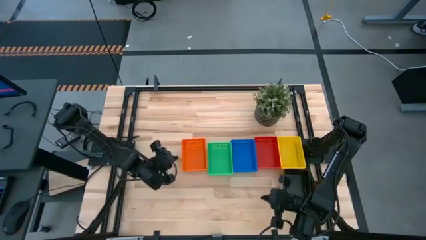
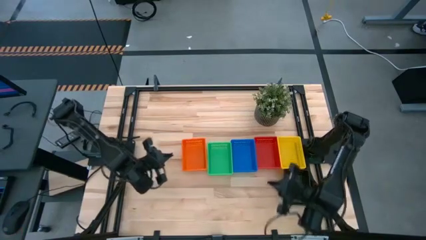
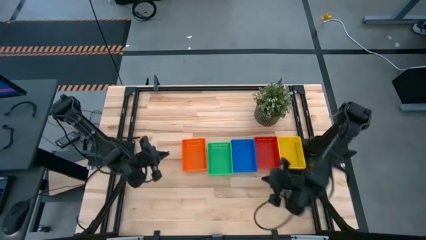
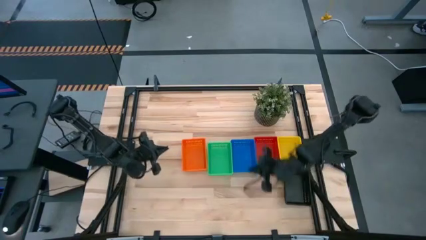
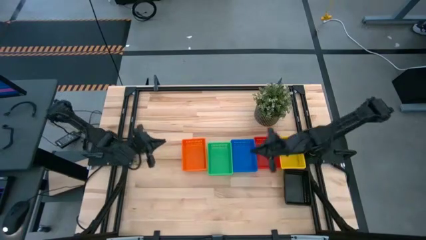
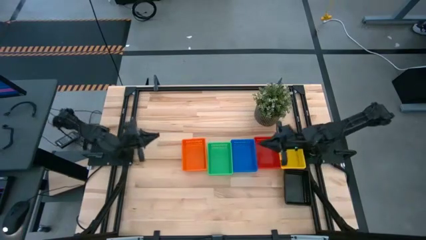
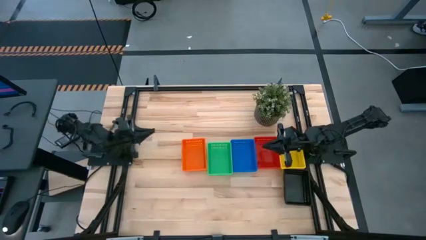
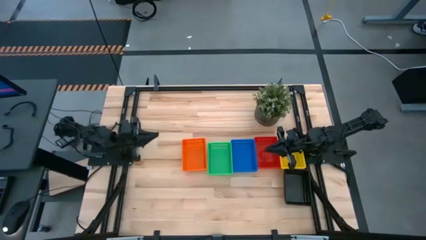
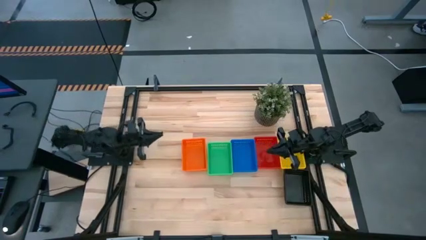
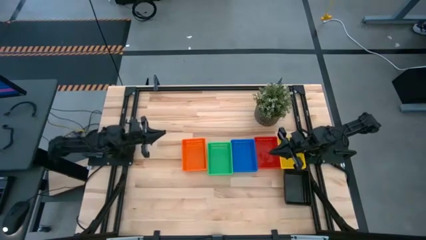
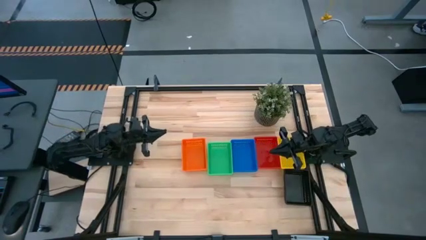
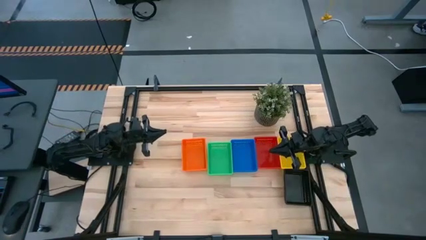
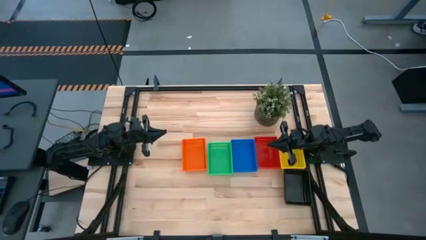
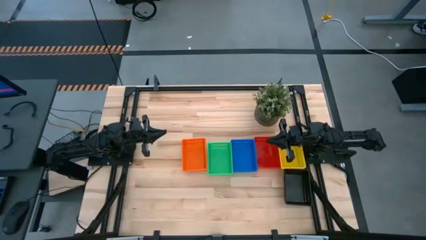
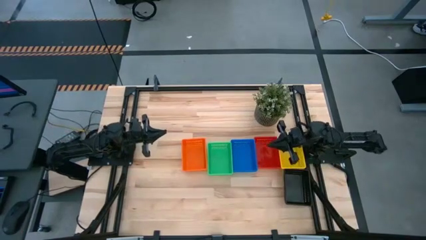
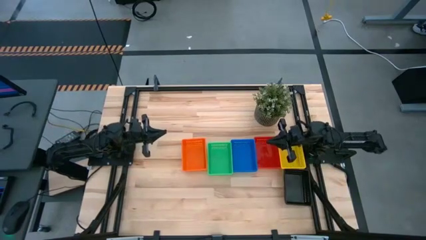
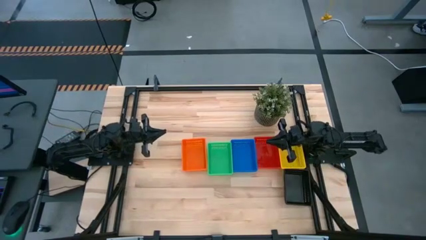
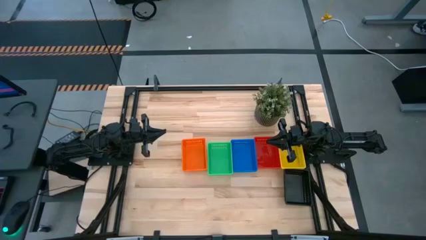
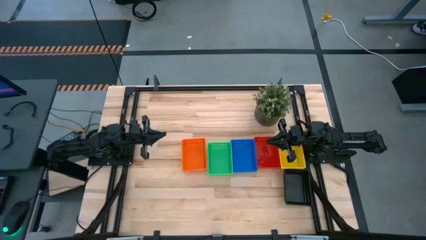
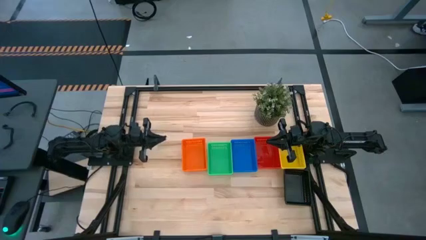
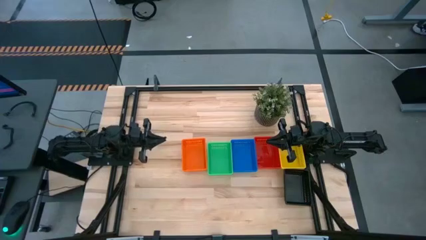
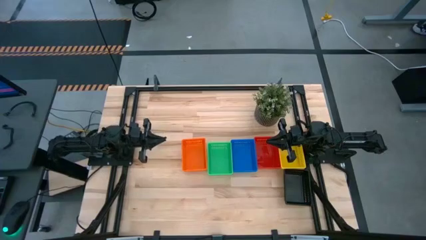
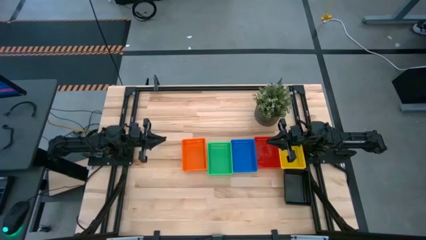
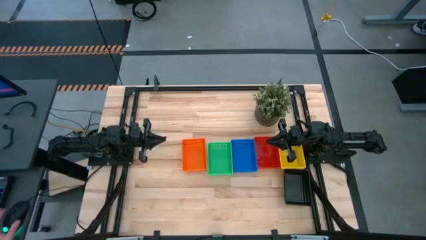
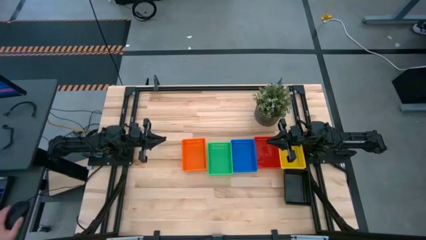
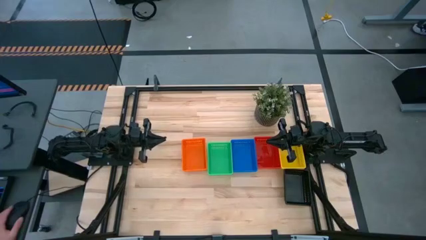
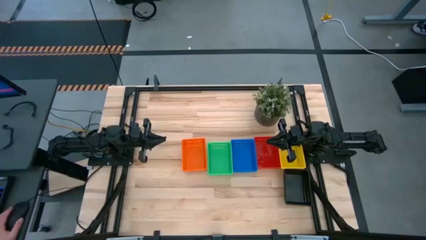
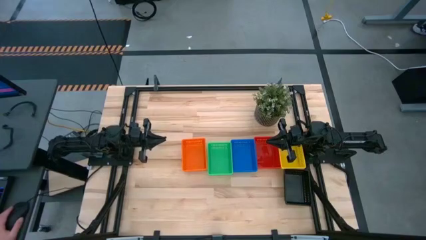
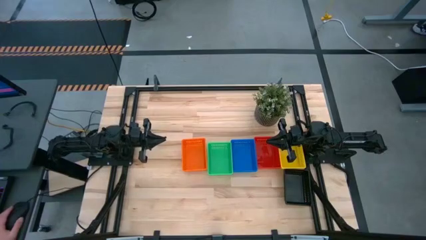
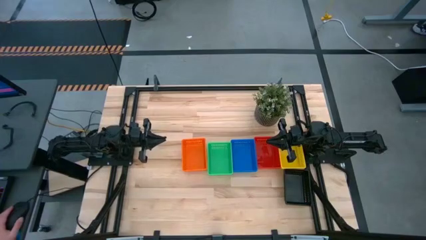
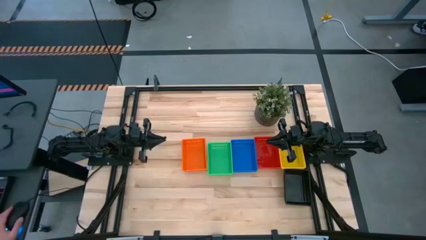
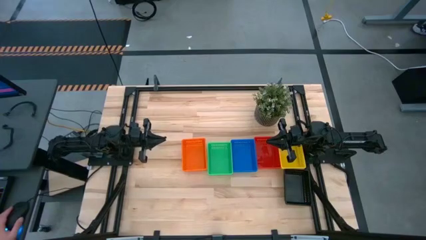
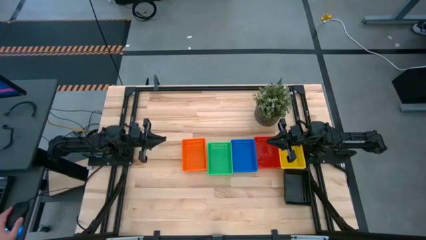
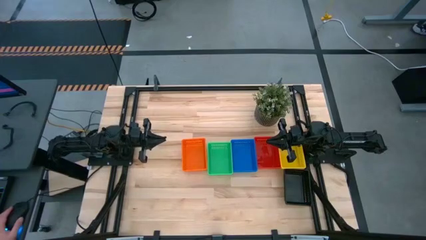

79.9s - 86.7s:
Return to Home Position

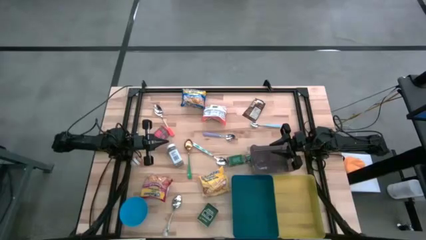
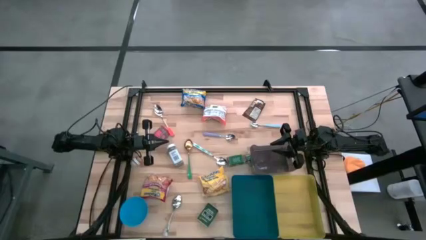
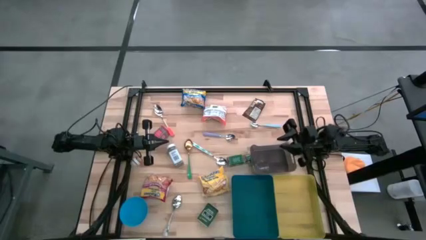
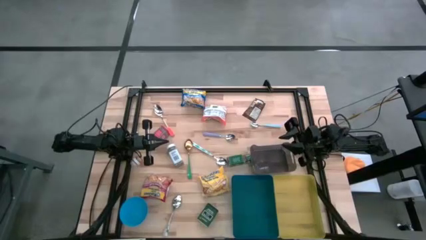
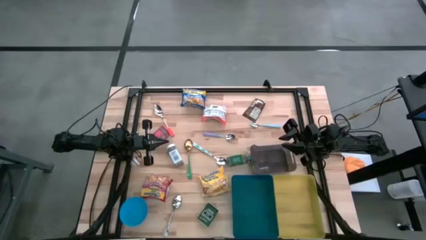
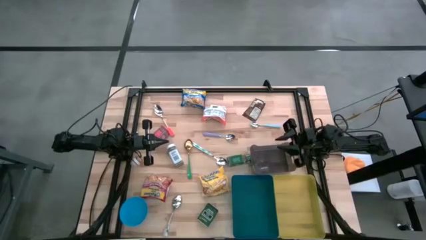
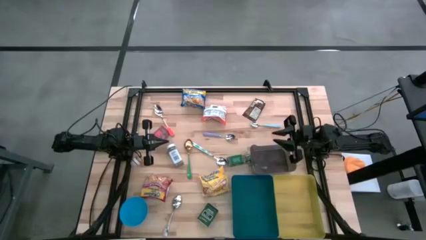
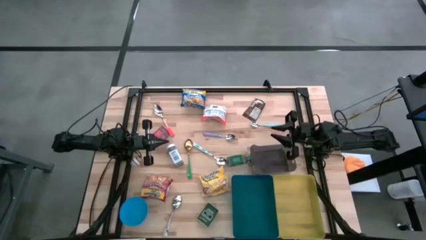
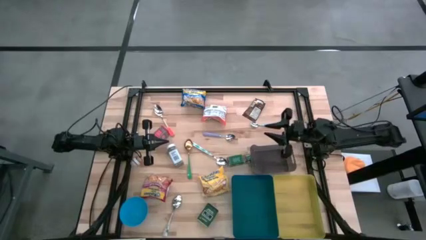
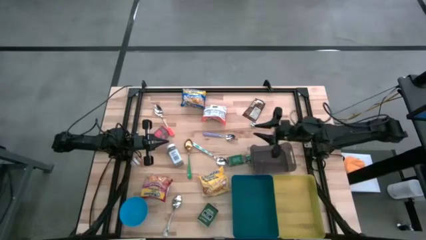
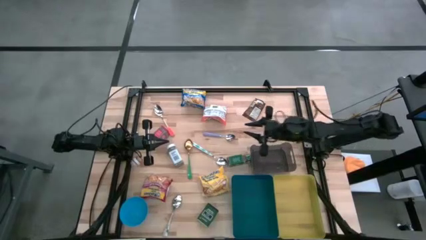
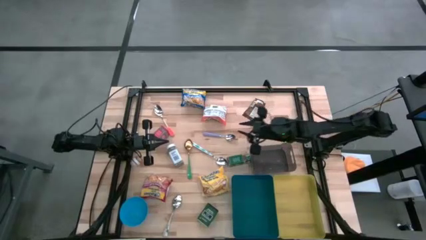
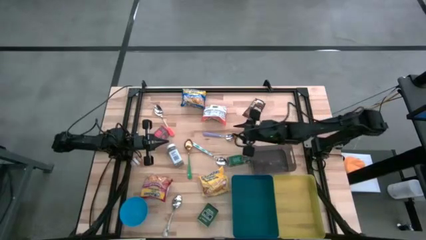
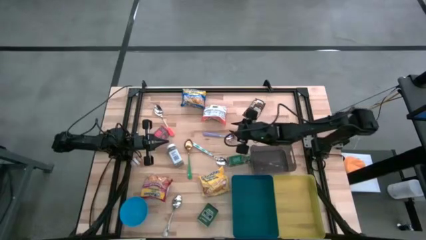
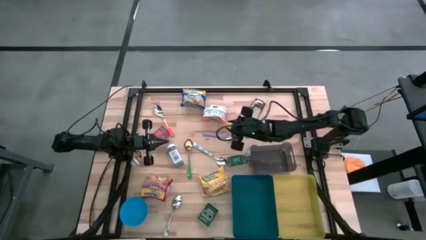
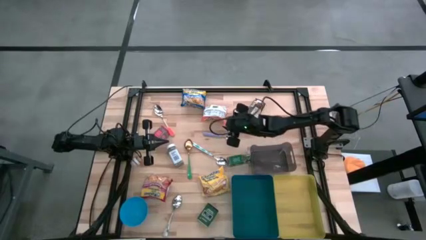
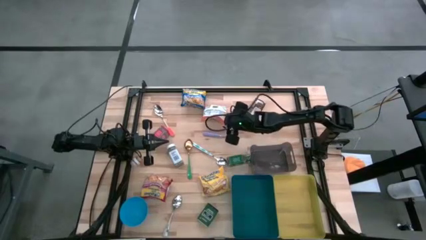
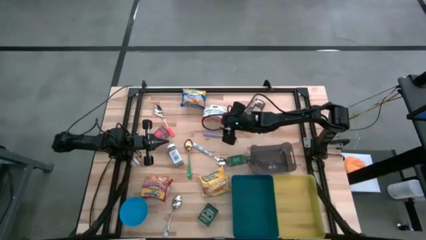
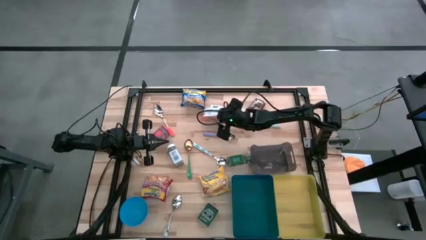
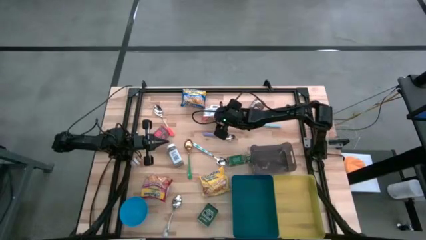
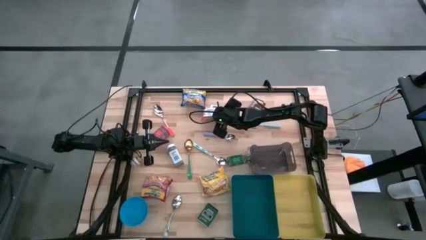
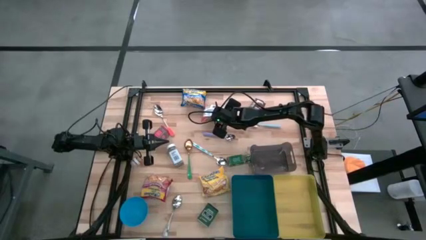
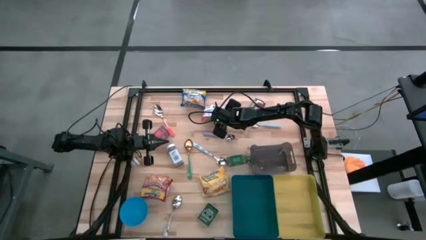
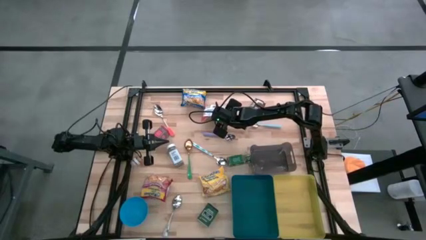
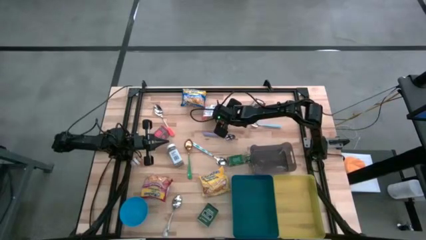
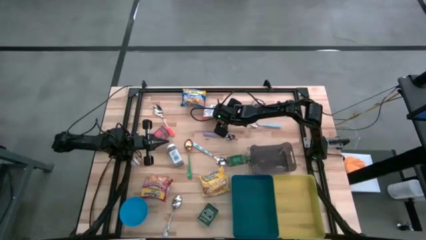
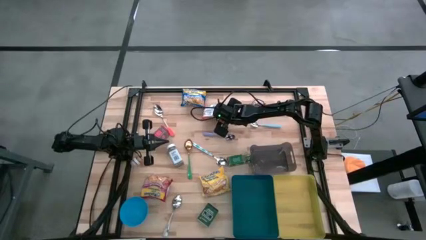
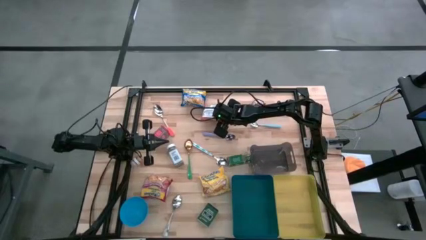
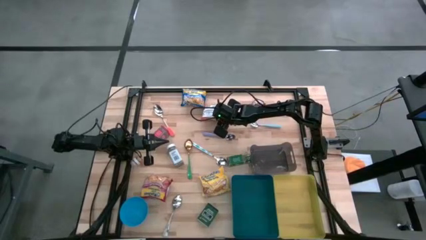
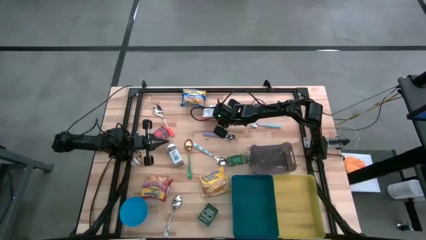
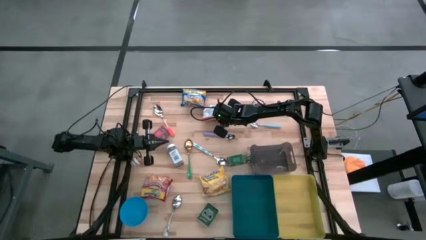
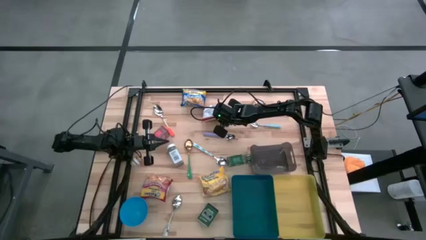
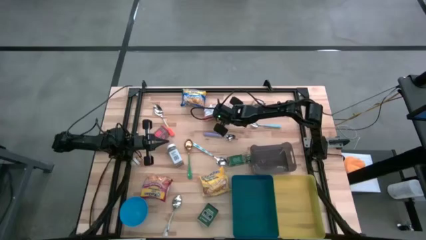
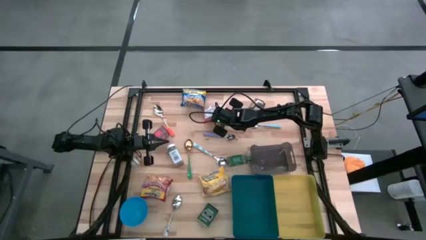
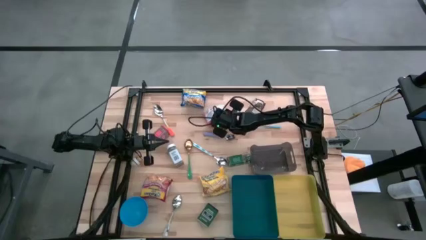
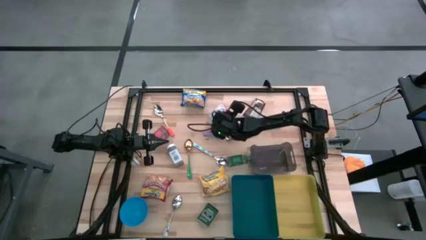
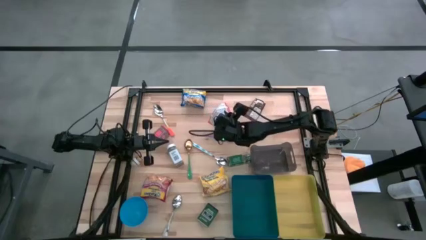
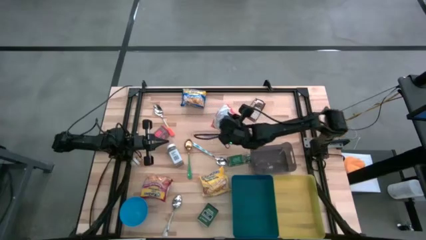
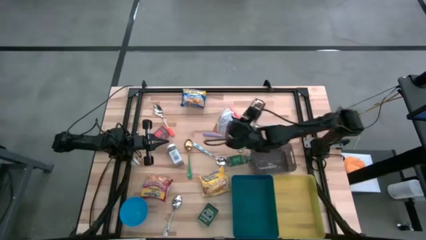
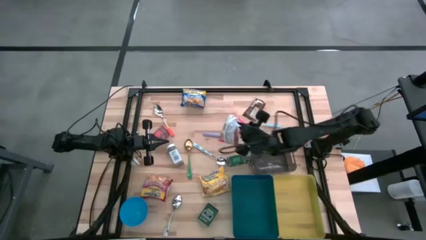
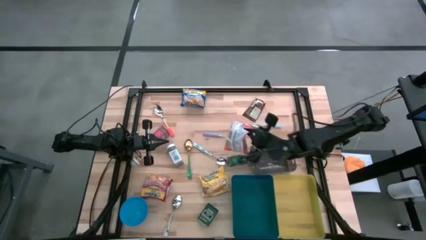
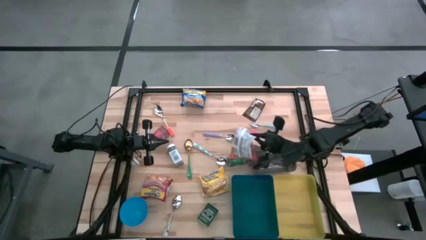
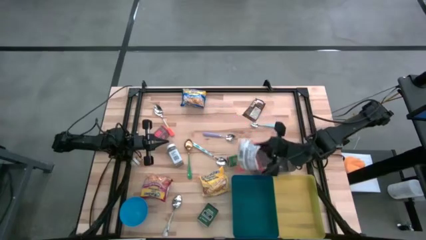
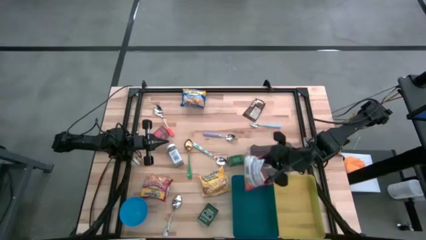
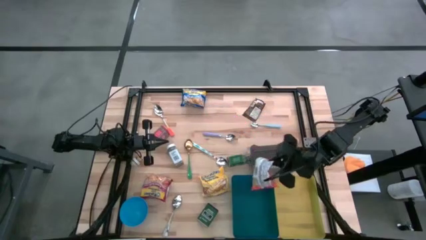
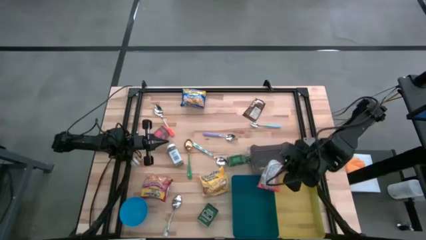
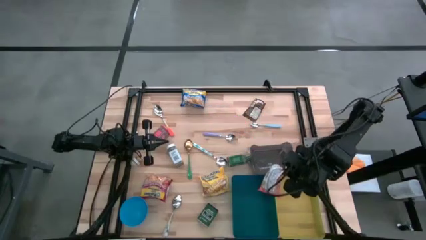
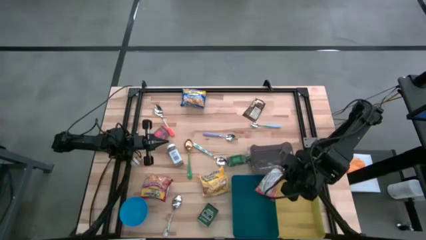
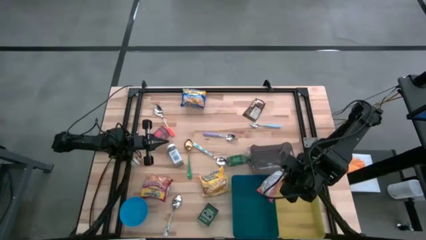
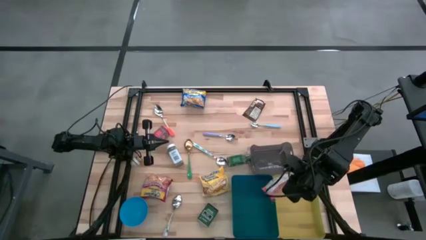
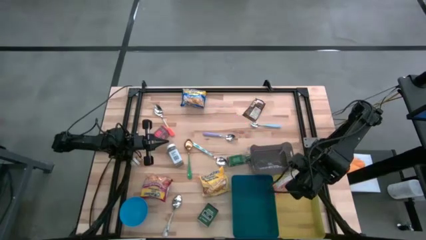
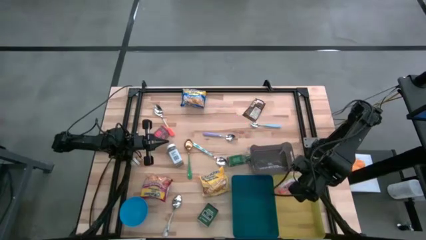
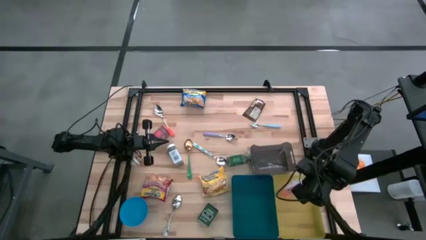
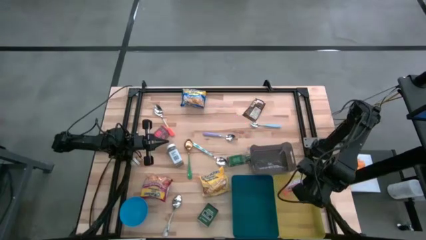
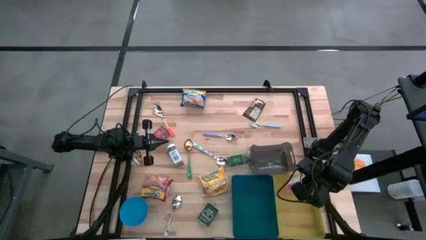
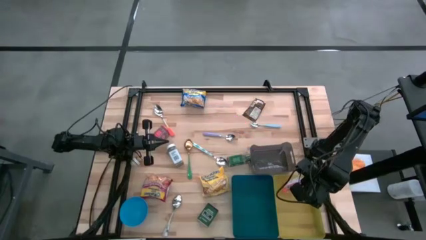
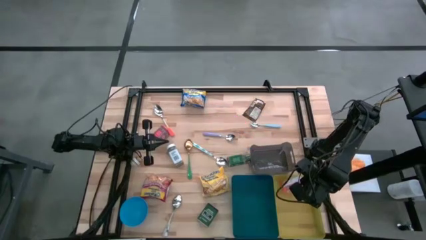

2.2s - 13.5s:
Put the orange noodle pack into the yellow bin
